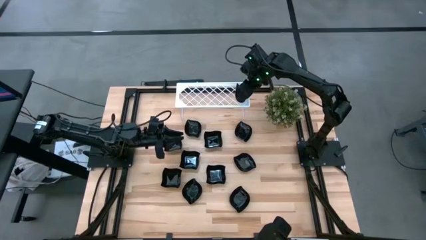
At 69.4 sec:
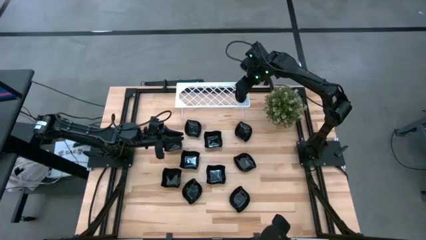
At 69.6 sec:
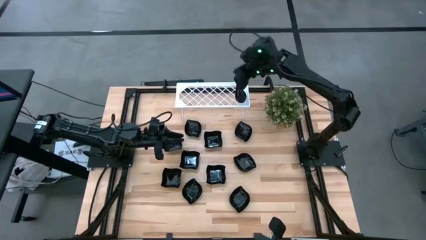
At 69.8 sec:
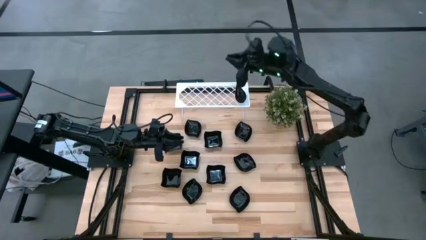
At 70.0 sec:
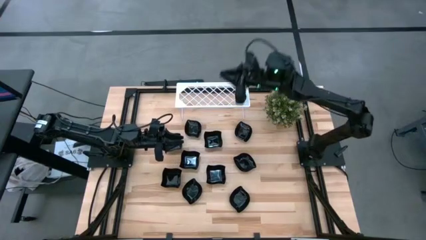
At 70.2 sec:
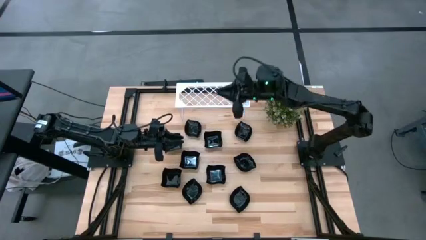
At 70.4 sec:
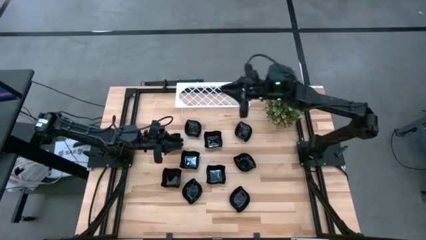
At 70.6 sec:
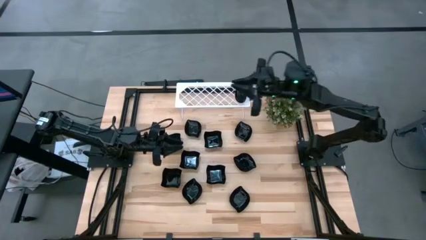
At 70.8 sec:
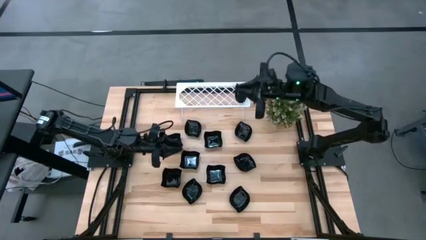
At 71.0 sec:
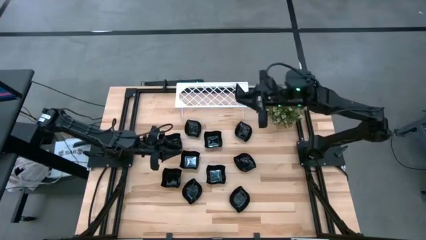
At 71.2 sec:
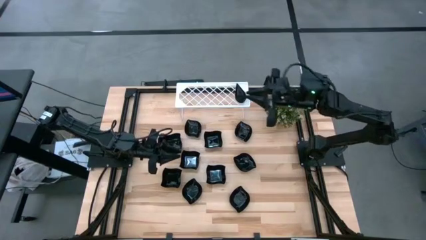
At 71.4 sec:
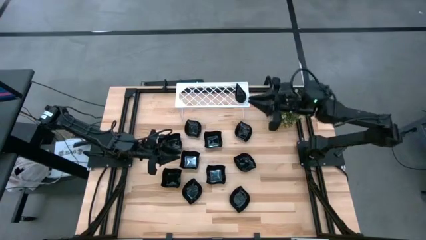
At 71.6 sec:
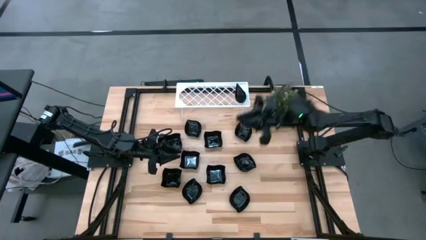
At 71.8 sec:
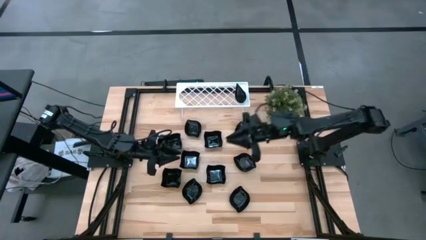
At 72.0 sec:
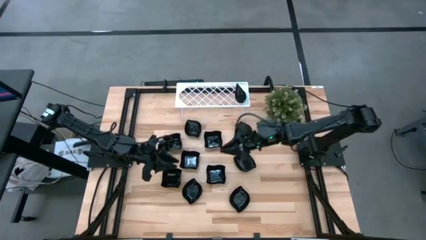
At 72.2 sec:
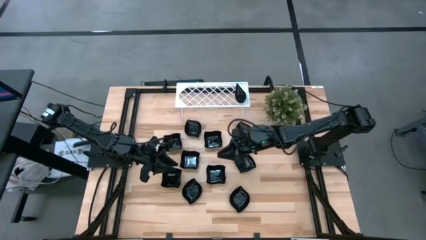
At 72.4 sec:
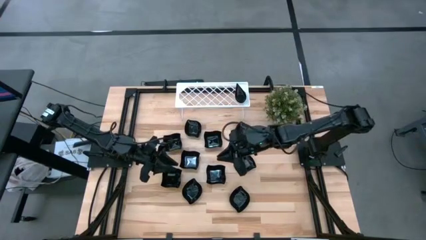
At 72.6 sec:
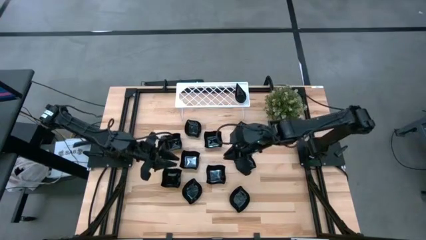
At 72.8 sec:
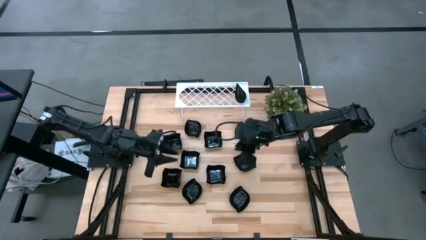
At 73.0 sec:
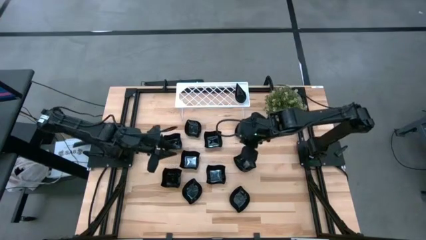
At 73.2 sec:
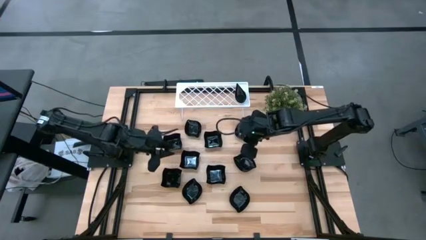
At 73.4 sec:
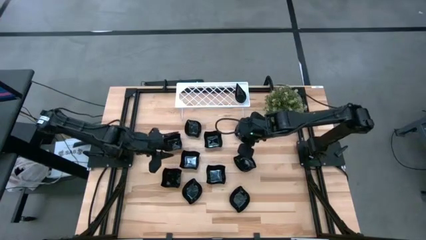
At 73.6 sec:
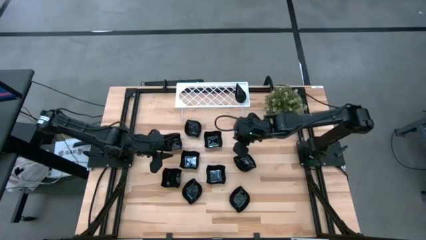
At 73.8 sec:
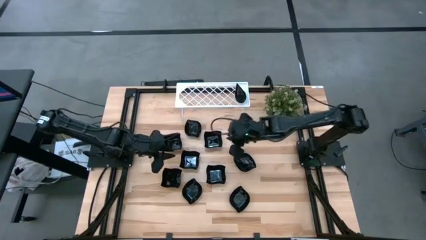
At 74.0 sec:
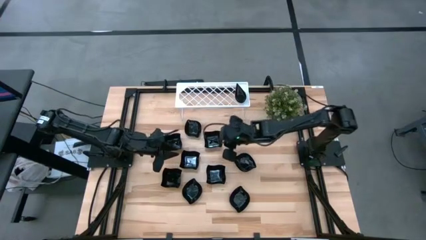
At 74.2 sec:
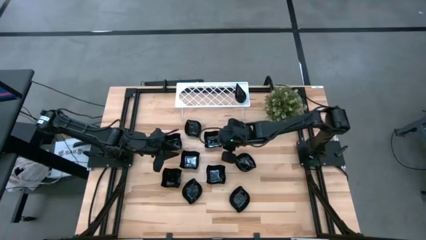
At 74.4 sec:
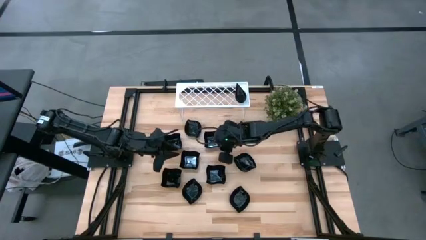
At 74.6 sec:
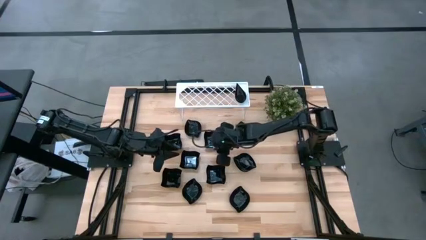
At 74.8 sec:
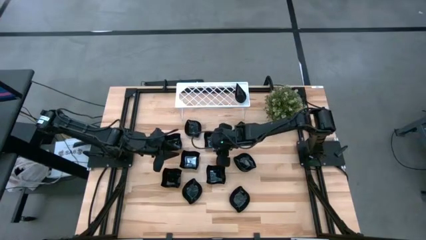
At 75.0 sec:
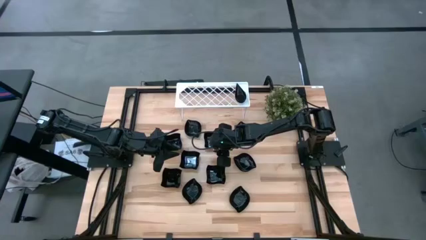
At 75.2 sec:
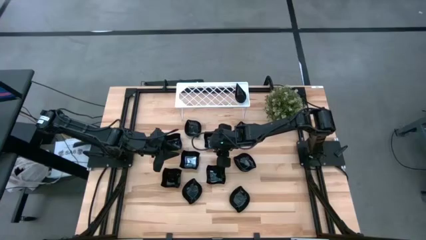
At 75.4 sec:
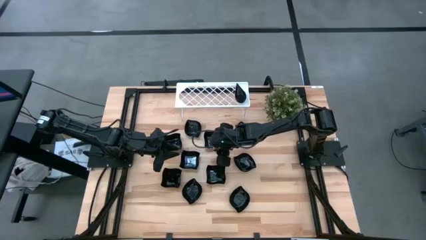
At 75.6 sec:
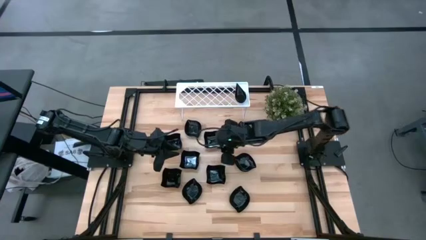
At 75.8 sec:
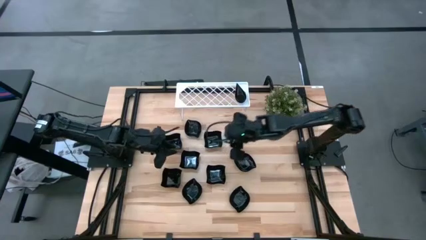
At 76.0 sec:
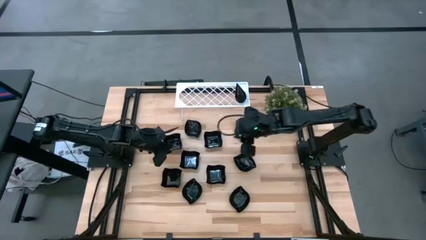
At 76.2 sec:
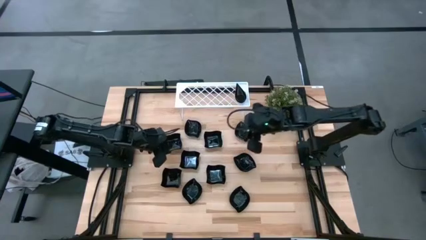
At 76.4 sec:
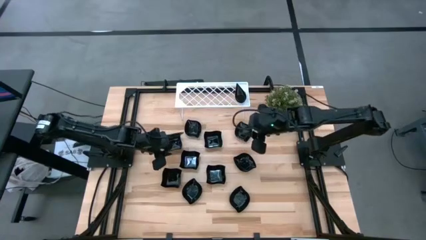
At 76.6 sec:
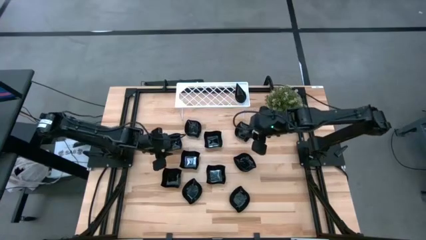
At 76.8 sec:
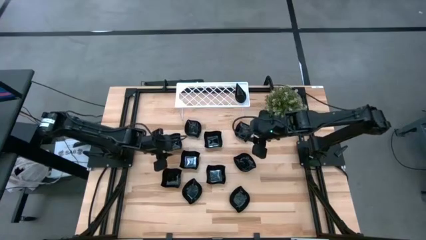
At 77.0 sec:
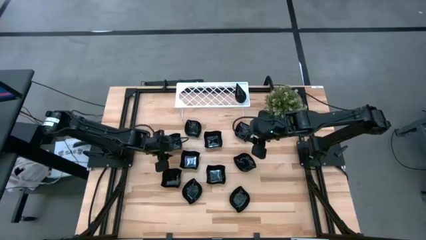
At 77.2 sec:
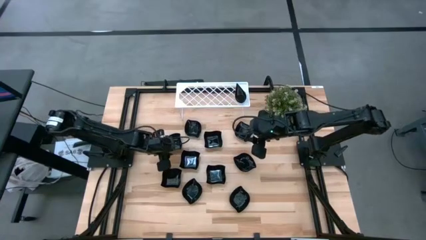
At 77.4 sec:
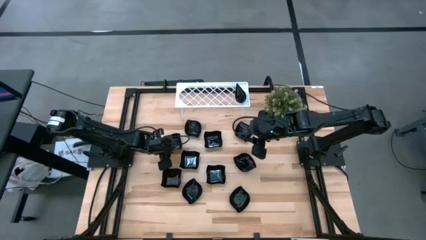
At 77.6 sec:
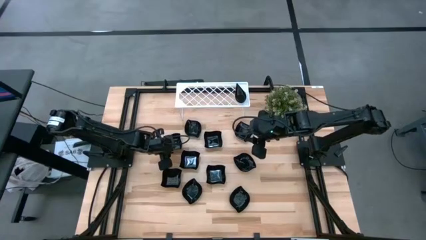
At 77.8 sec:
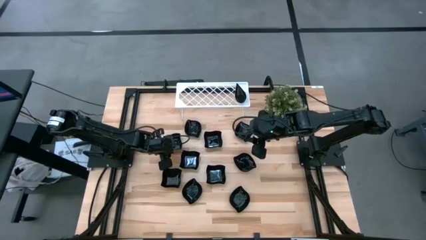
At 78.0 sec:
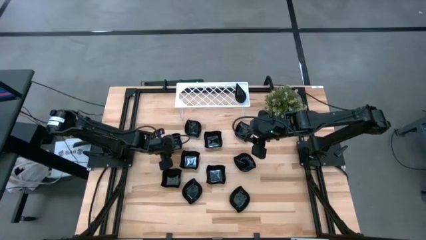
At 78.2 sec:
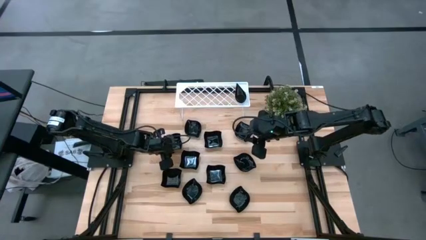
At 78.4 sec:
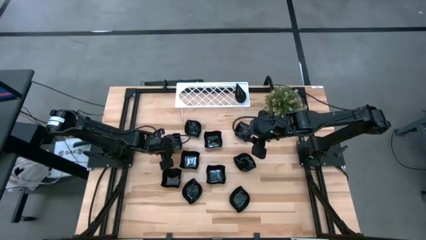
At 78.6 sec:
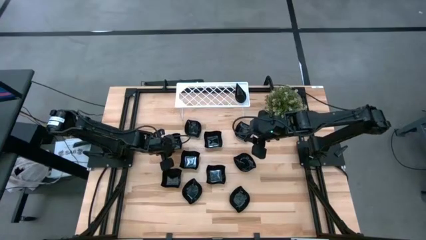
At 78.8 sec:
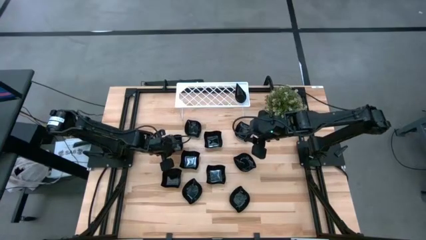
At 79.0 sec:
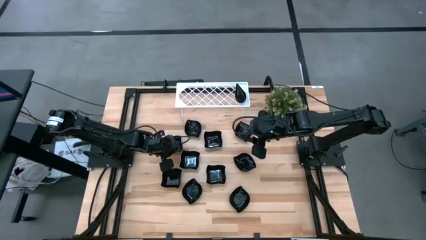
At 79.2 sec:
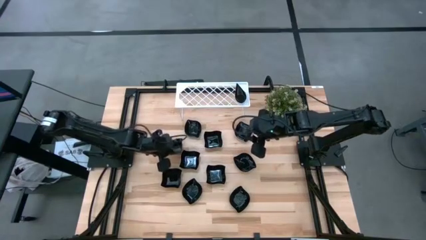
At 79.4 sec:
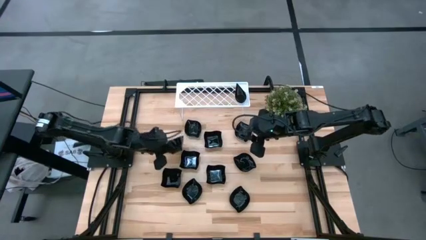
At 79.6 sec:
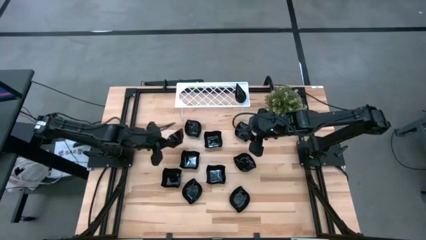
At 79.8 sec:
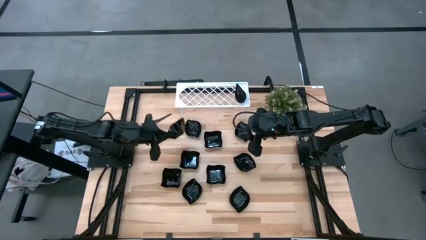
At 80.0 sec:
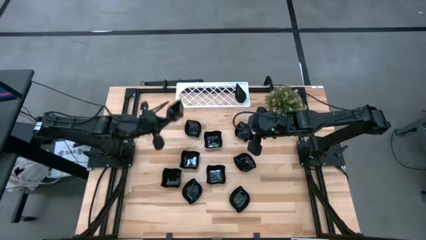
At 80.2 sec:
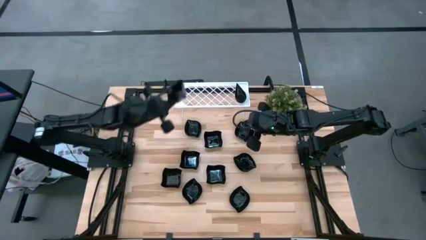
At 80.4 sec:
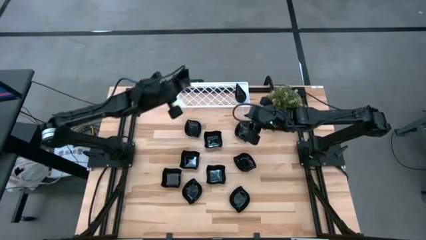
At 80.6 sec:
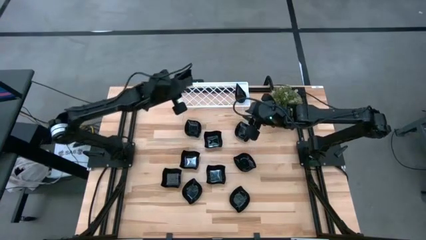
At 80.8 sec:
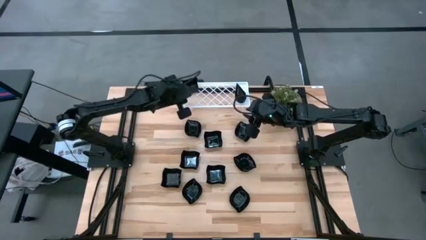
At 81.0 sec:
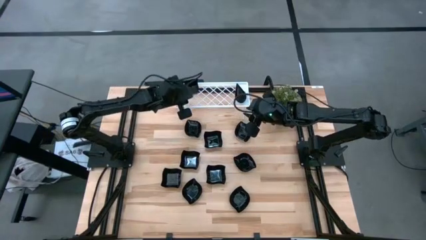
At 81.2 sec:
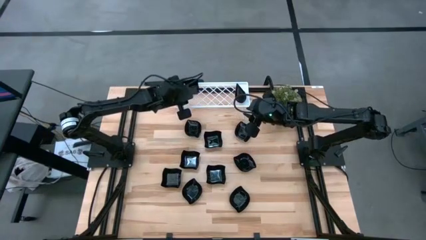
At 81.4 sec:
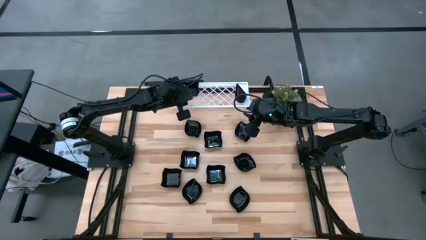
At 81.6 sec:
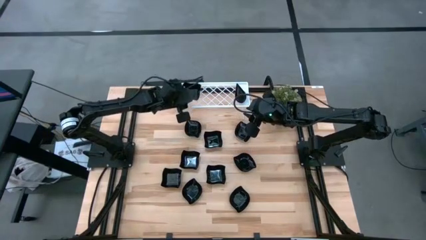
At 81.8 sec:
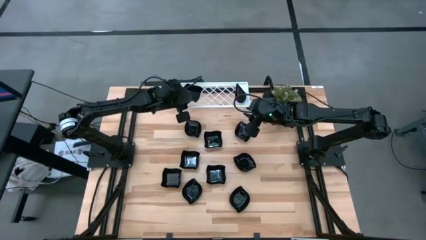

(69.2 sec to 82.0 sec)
Task: Pick & Place Mini shaped plates
Put the distorted square plate on the shelf
